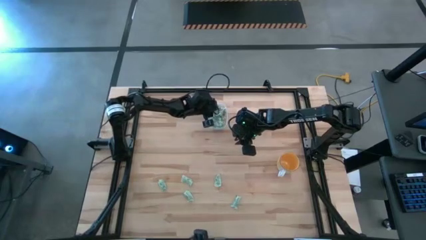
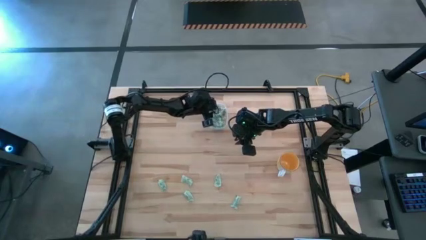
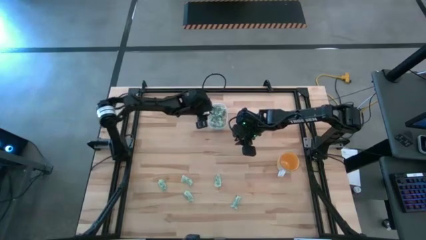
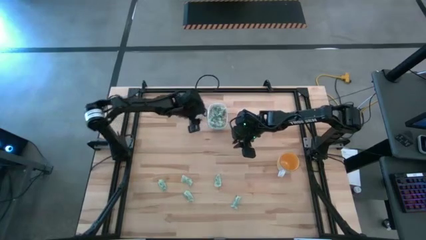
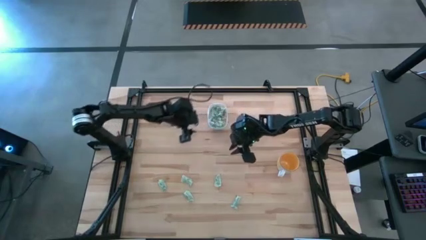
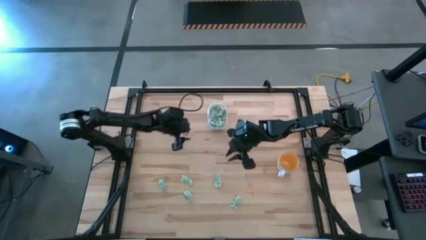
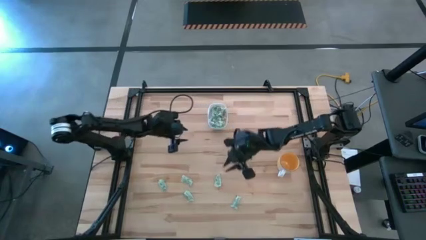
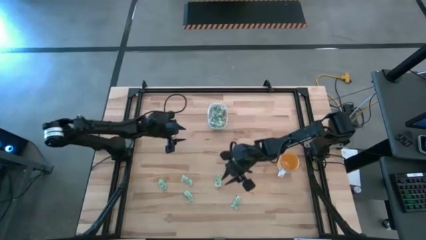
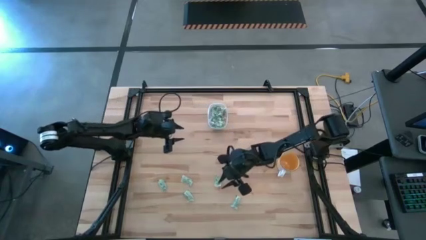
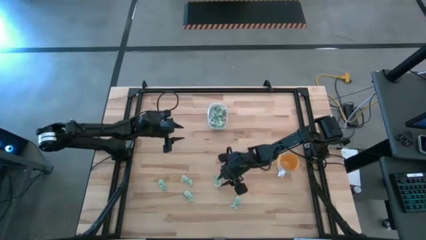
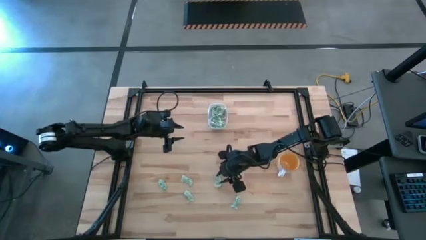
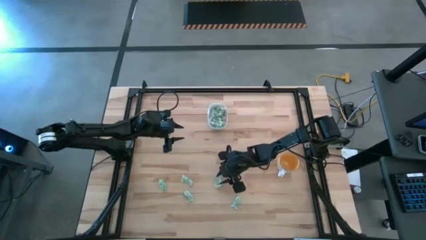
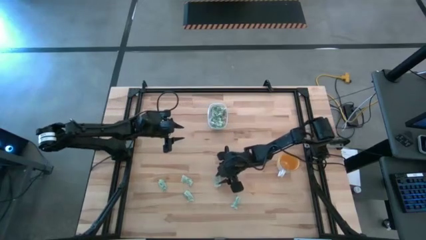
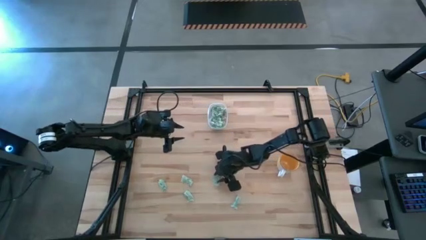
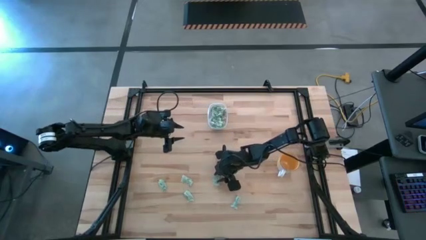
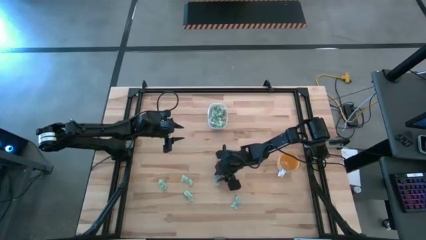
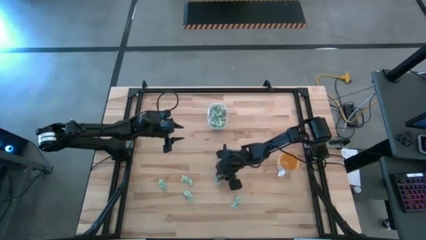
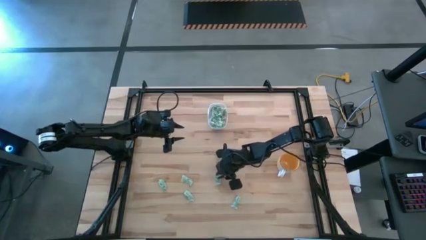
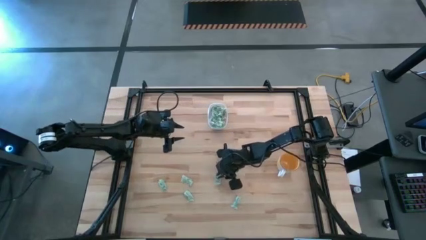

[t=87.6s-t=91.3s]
Task: Pick and place Stevia / Truvia into bins
Put the green stevia packet into the transparent bin

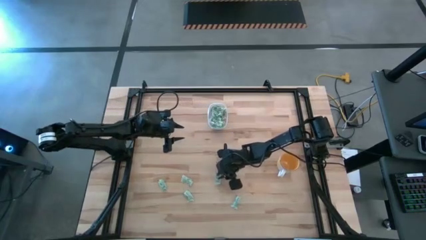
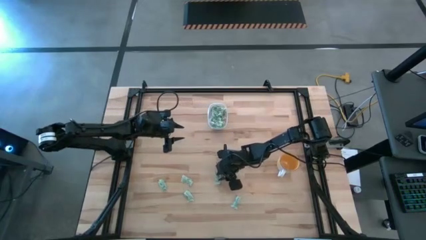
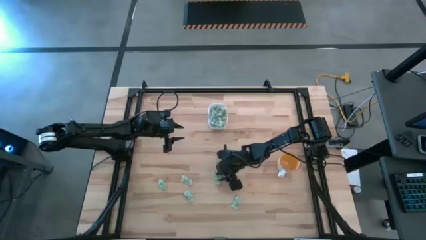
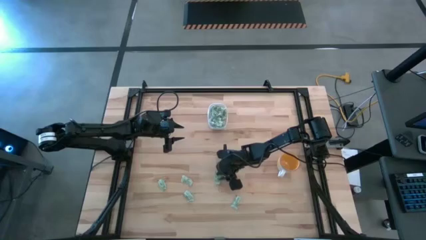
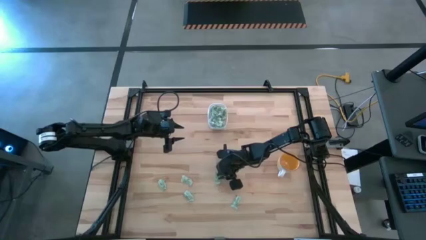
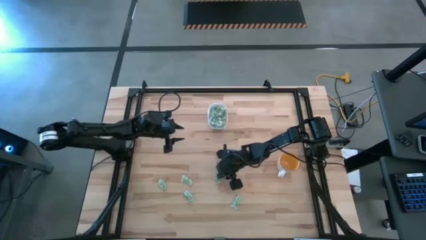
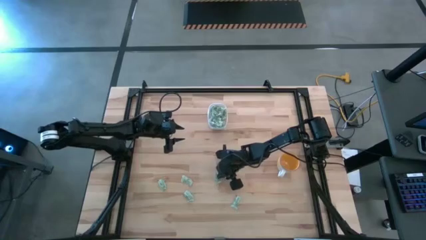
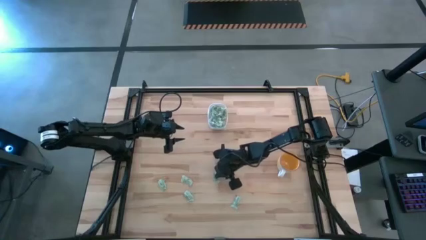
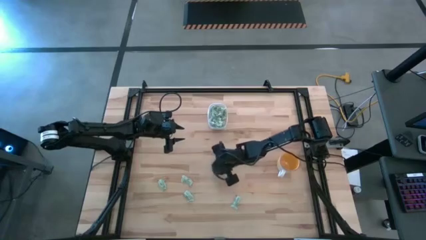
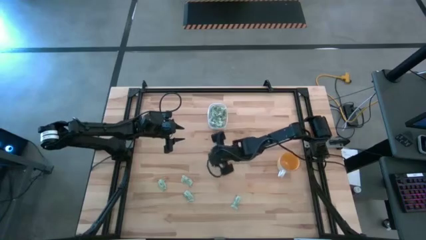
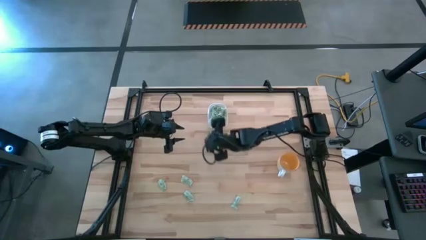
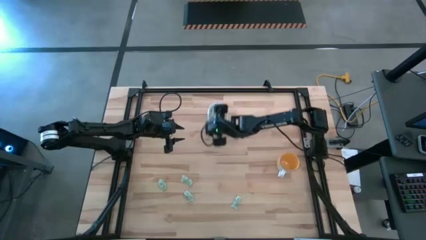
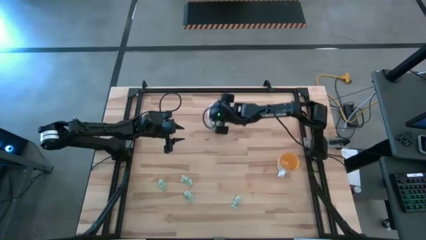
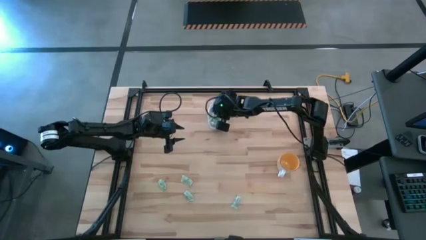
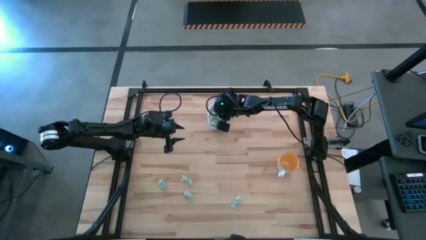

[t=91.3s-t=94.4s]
Put the green stevia packet into the transparent bin

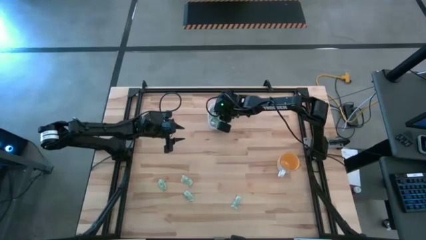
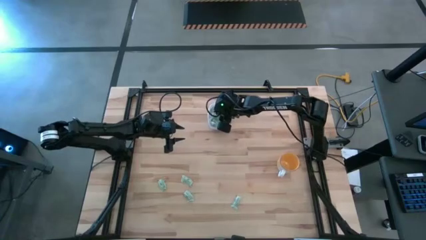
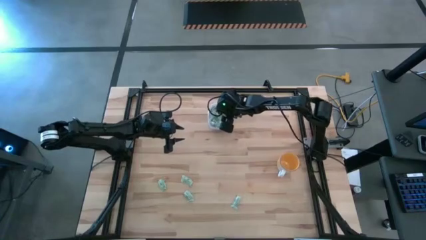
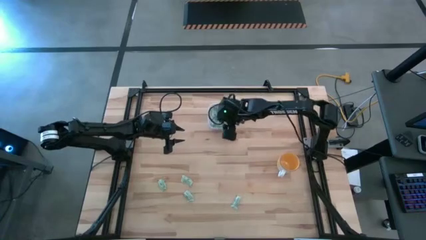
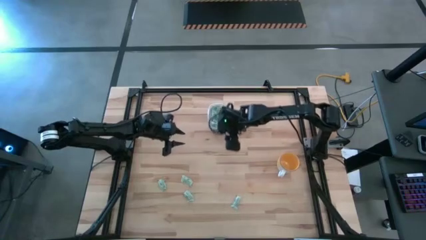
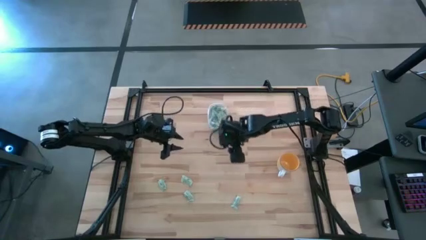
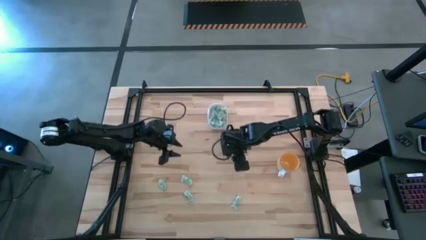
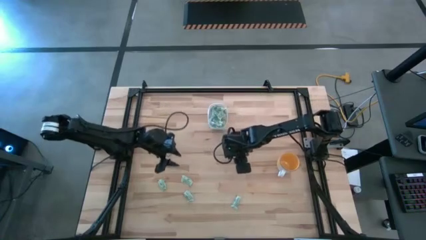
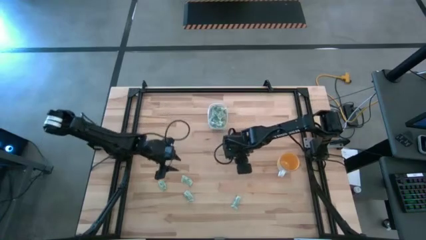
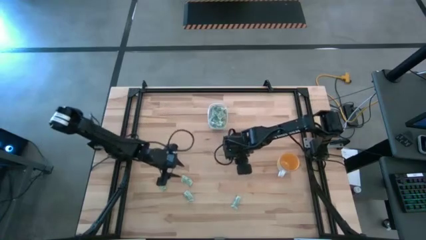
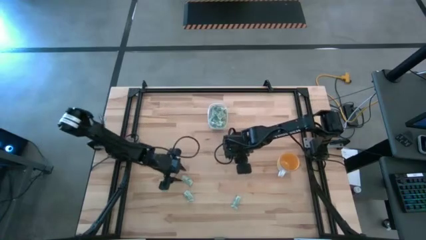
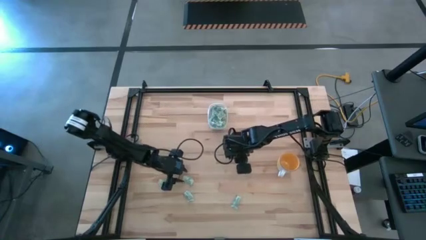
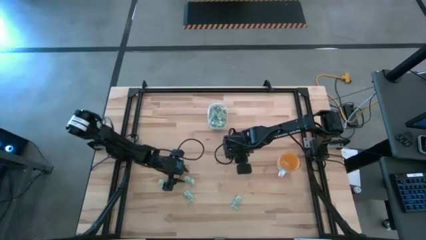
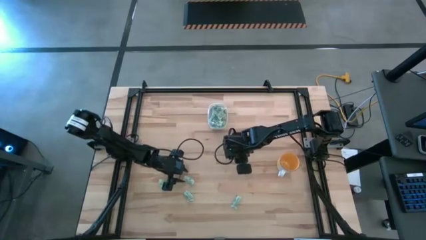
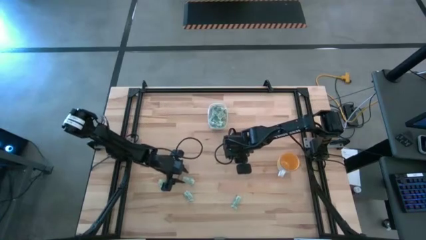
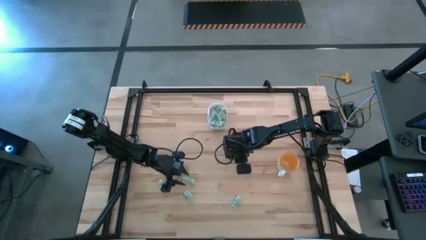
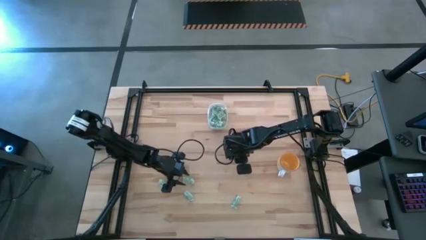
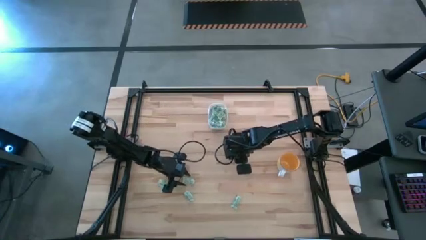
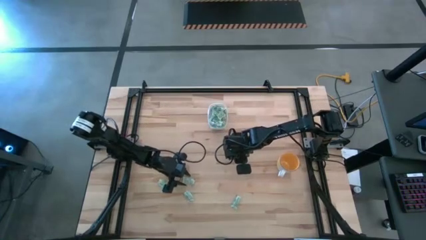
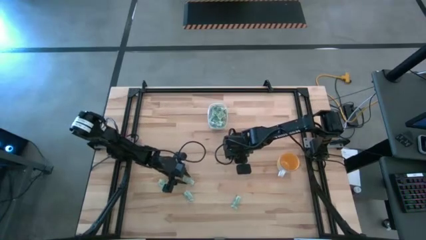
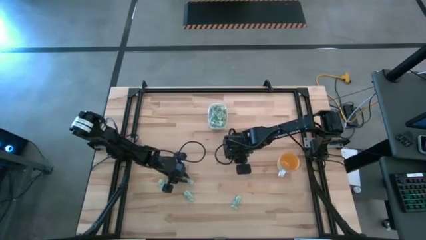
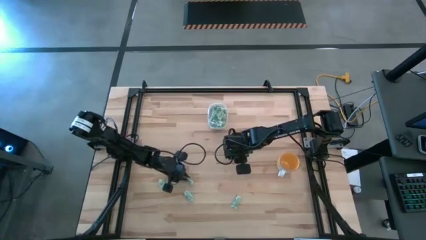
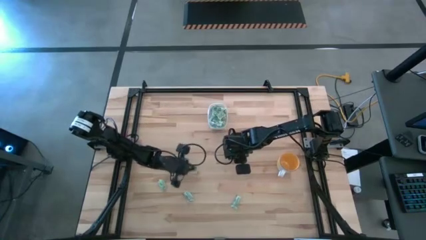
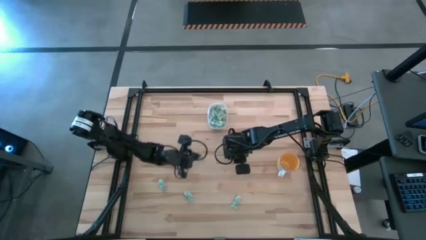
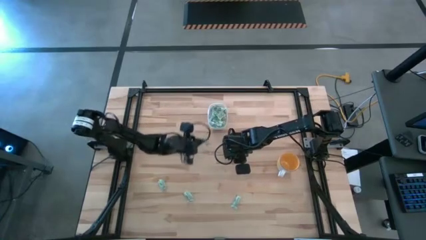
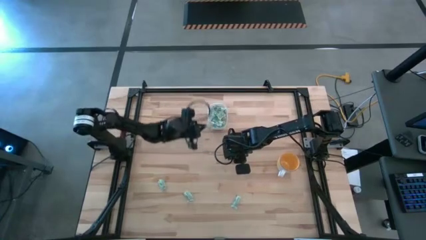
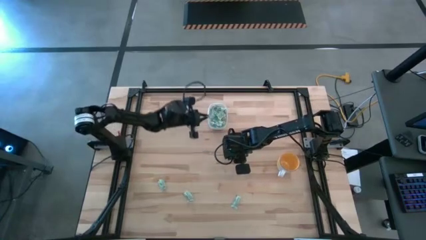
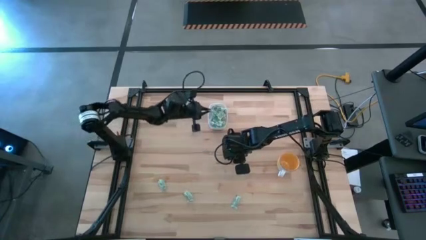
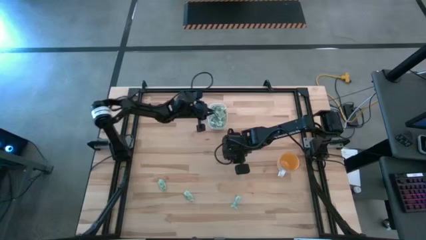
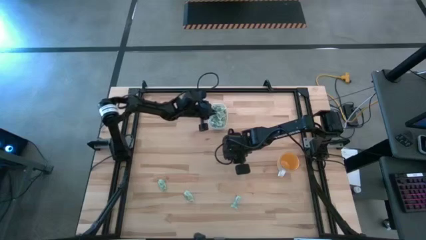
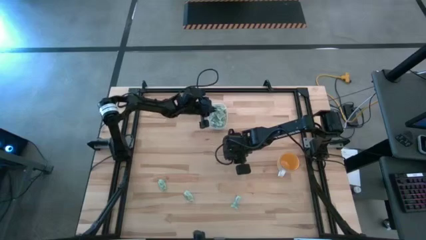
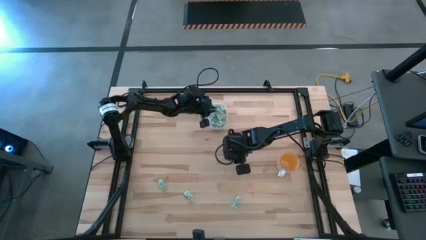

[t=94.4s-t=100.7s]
Put the green stevia packet into the transparent bin

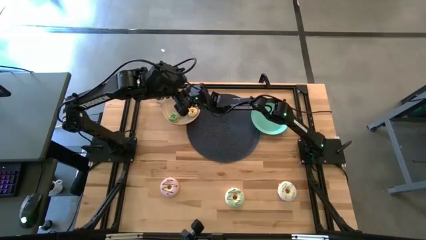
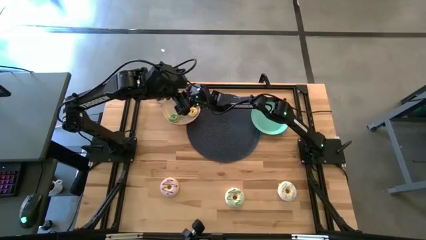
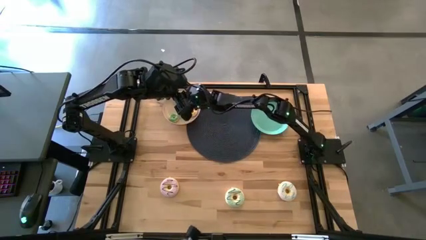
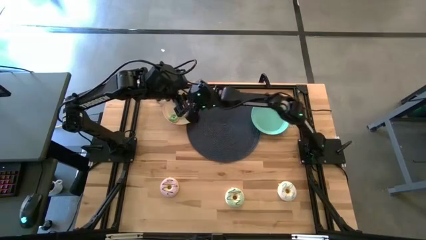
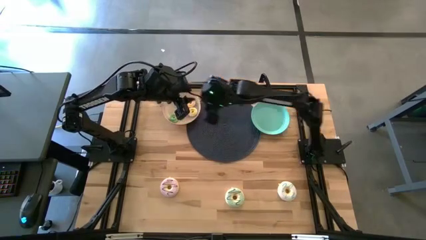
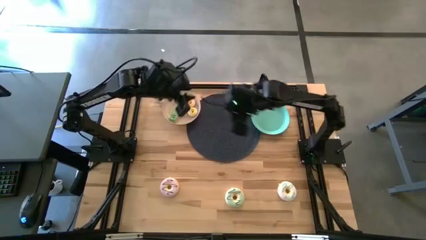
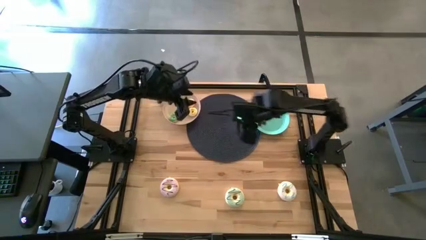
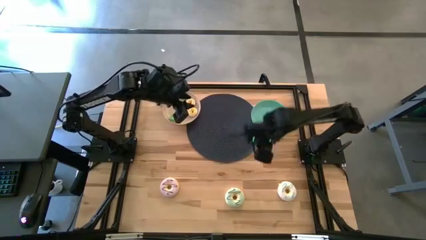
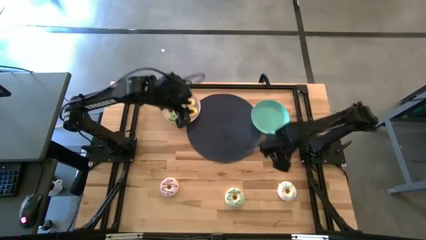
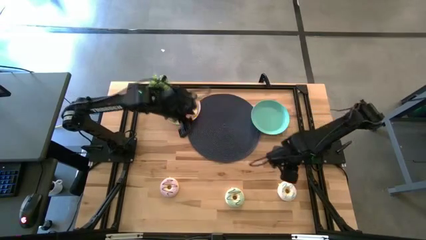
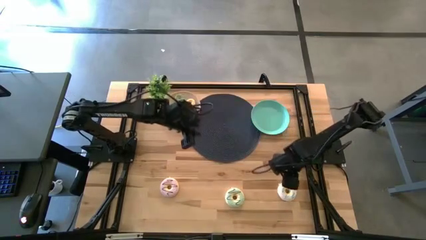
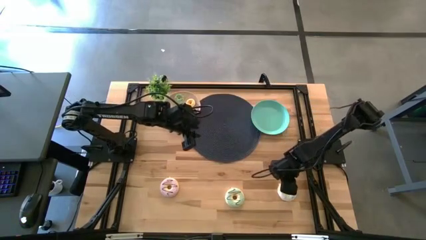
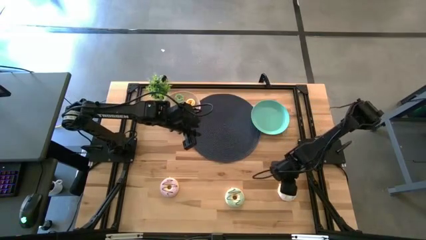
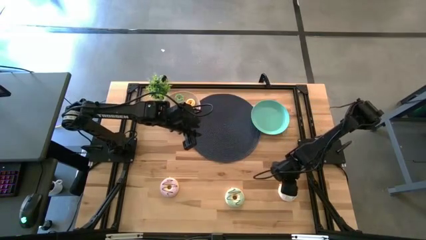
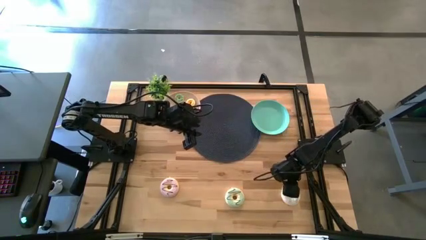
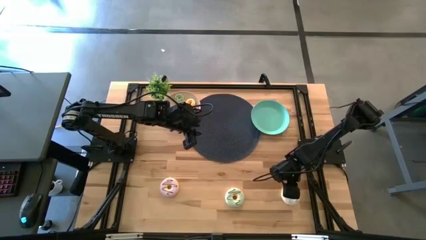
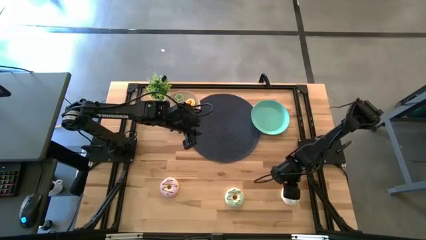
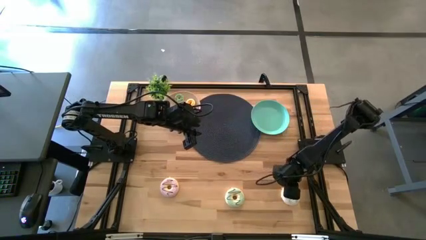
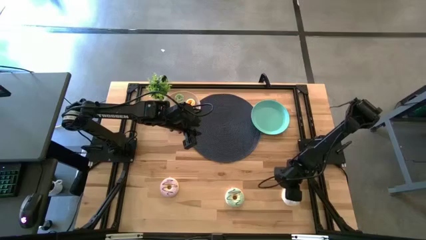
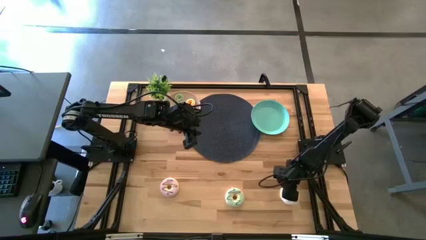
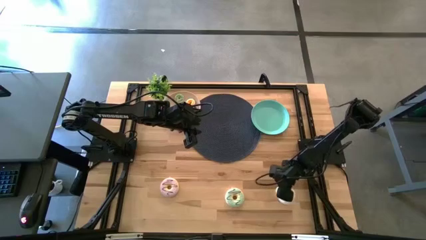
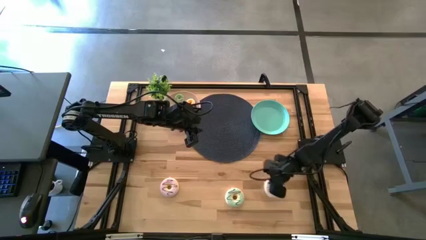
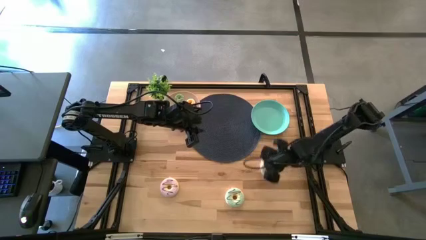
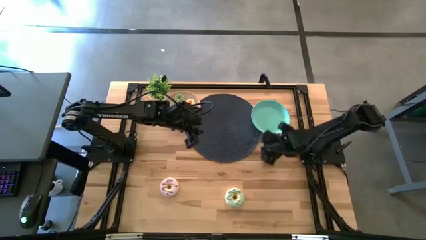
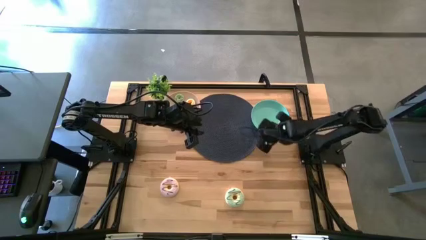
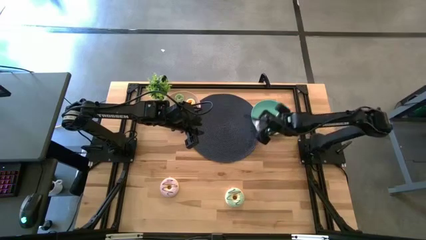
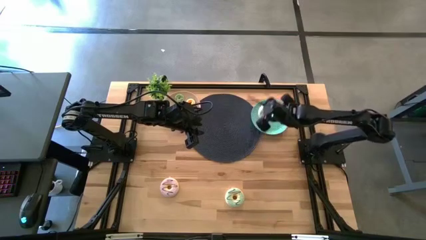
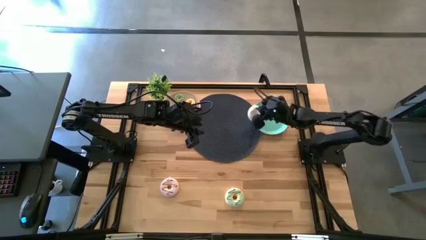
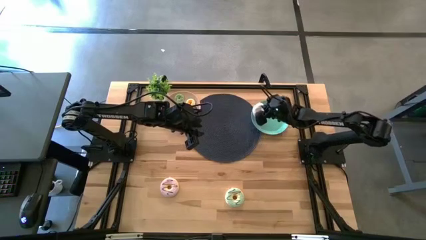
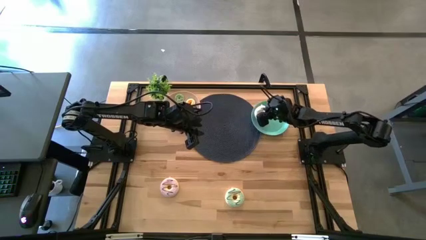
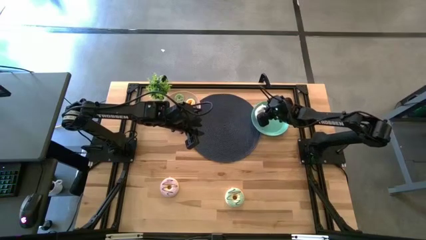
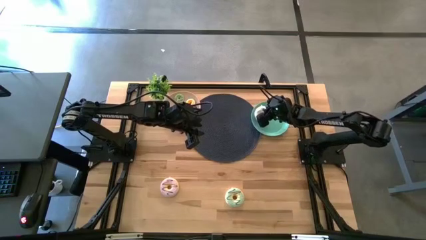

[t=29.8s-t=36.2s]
Task: Pick & Place donuts
Put the large white donut on the green plate
